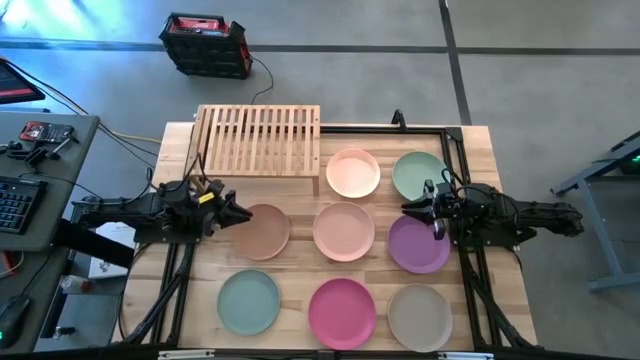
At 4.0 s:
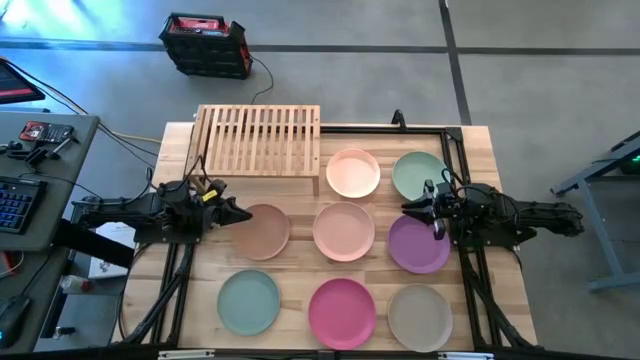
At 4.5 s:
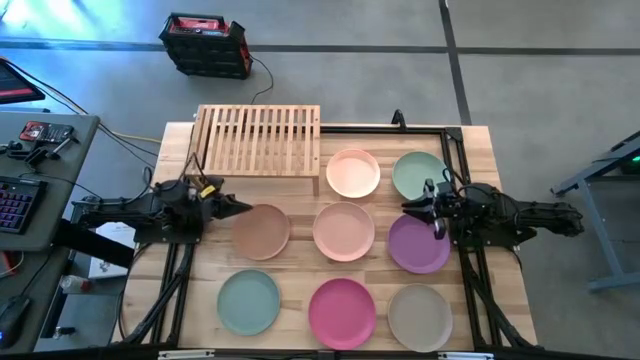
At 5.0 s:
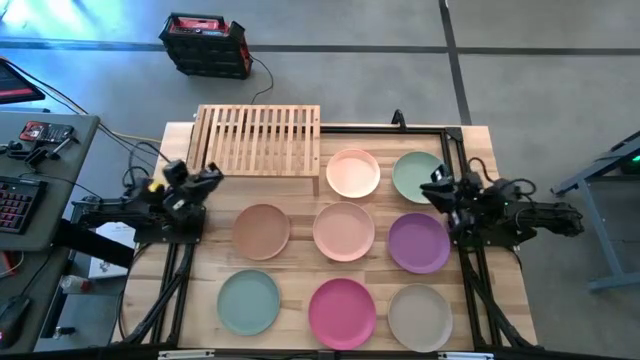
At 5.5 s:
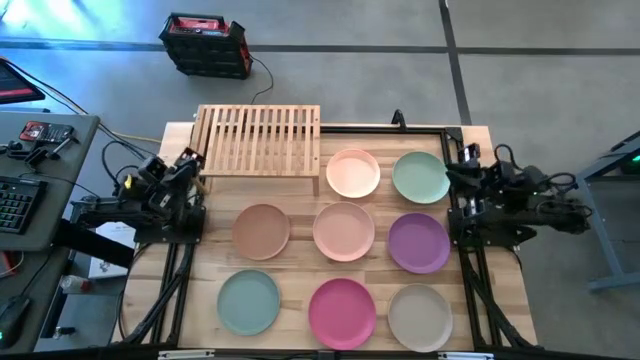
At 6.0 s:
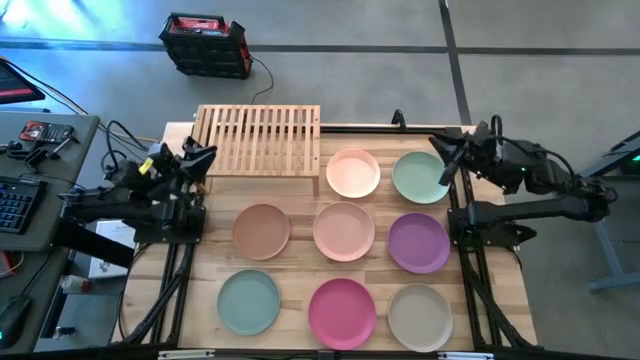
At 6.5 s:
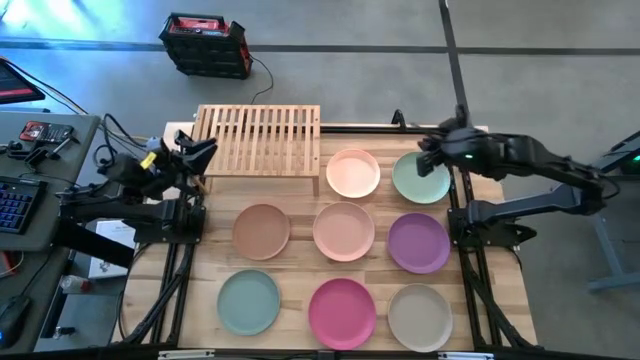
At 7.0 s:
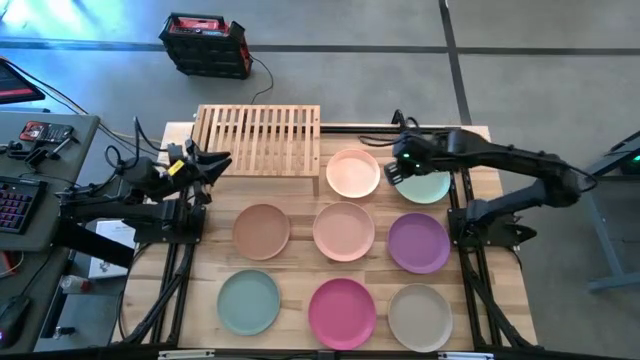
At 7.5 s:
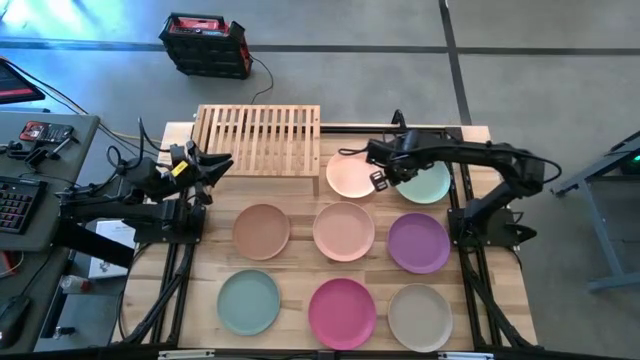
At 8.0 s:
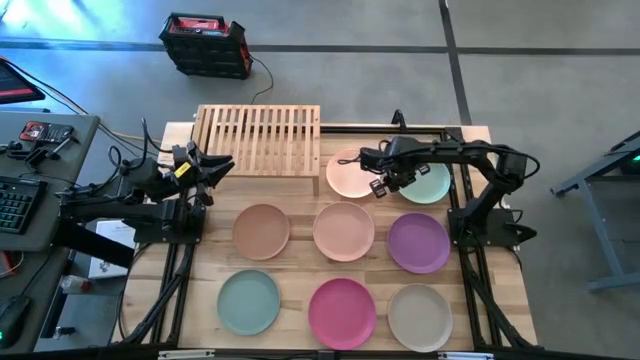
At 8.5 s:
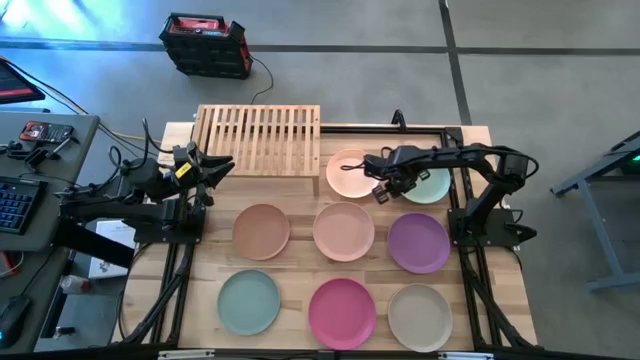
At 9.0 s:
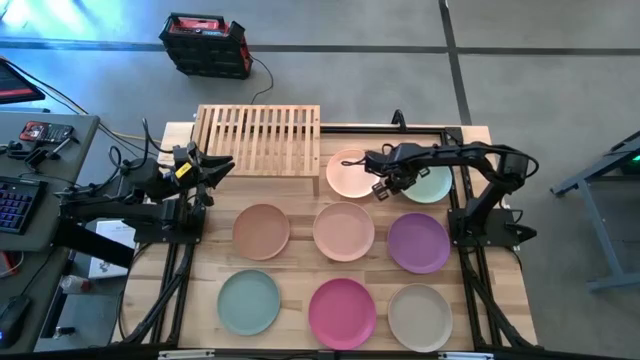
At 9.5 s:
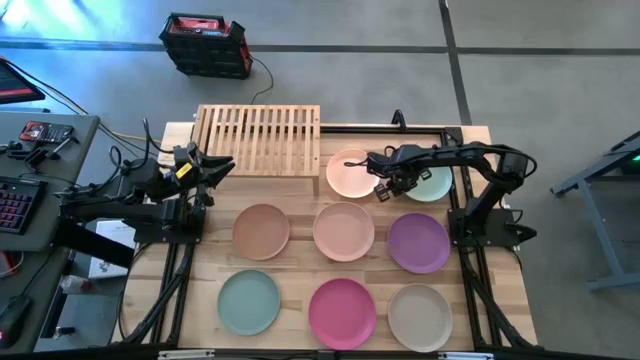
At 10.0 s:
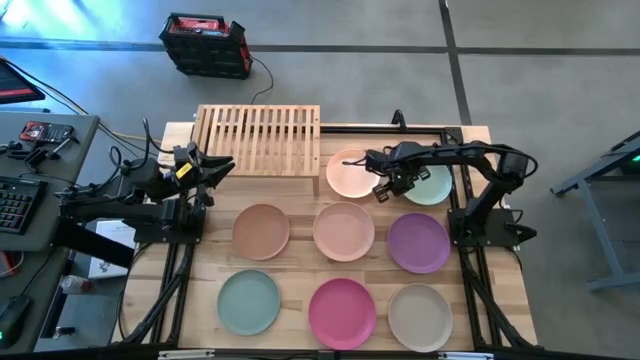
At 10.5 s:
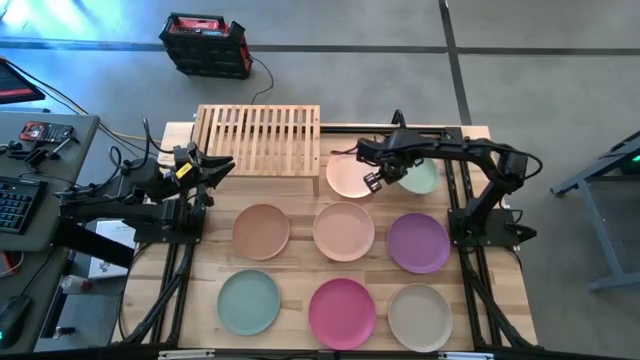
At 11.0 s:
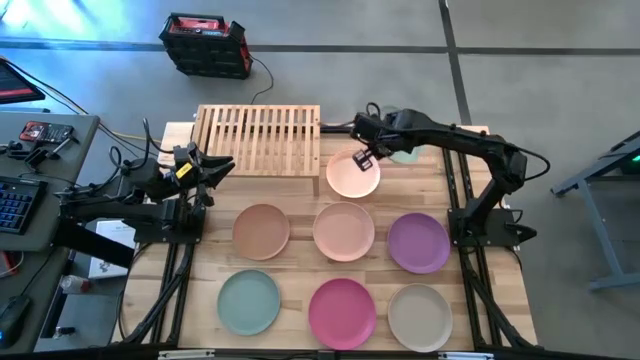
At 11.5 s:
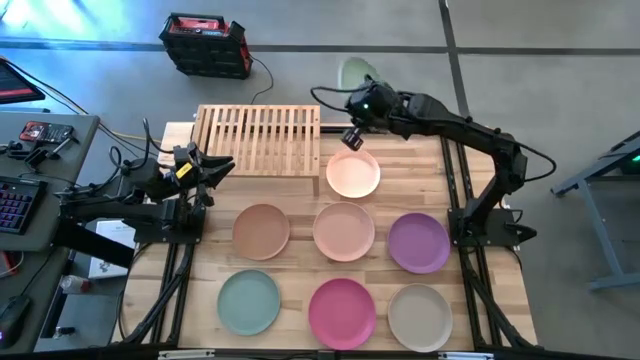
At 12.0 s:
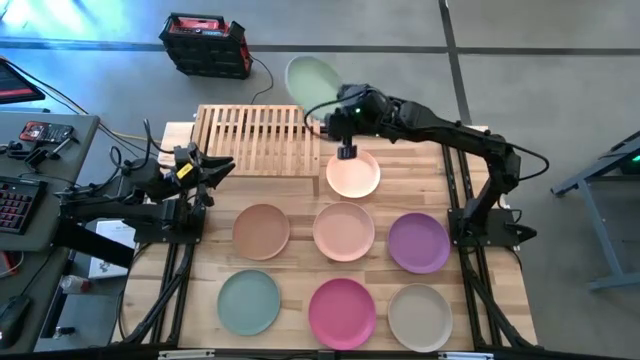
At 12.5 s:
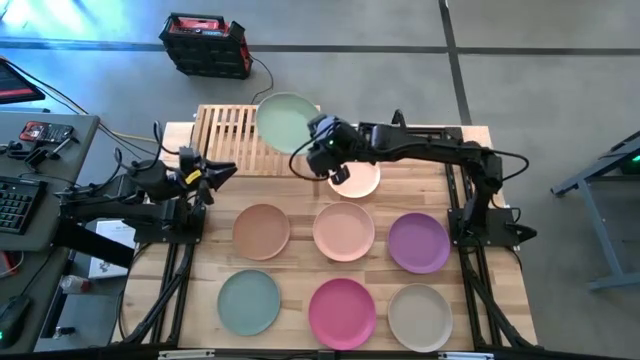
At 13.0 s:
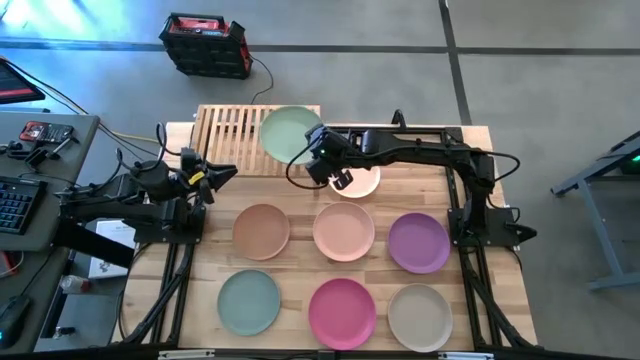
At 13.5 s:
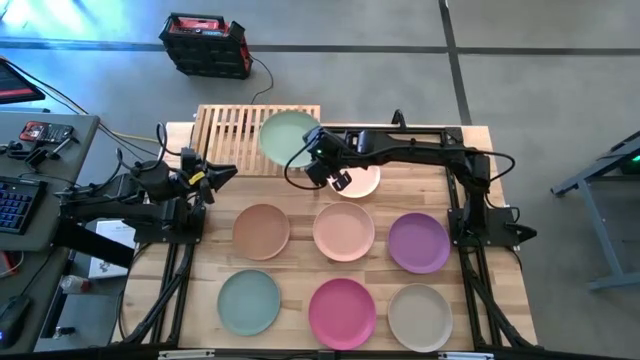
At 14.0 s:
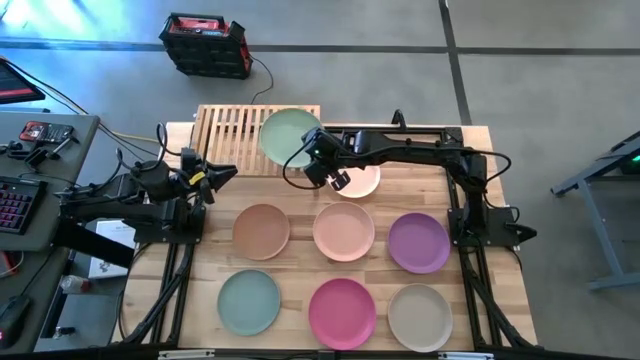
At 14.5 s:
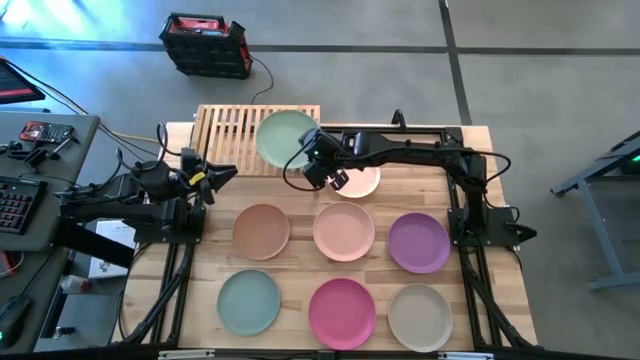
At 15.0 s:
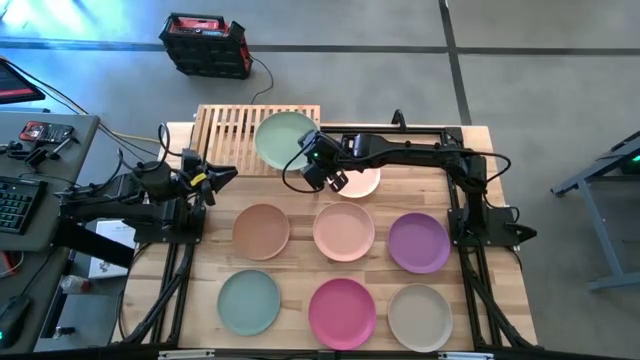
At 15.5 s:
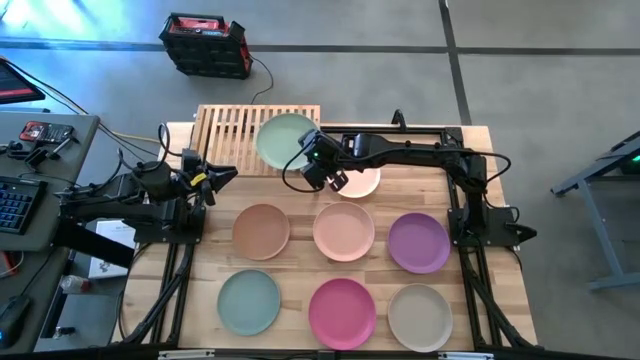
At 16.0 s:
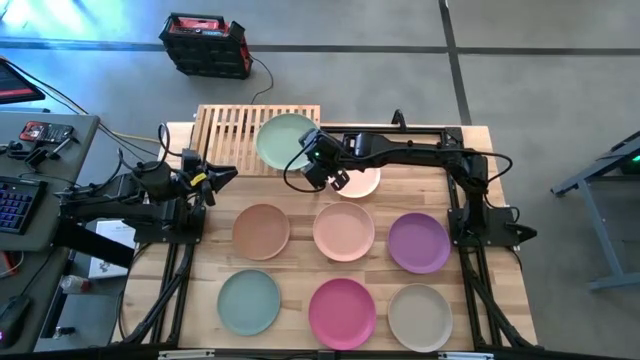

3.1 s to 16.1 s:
Task: Place and stack plates onto a shelf
Put the blue plate on the shelf
